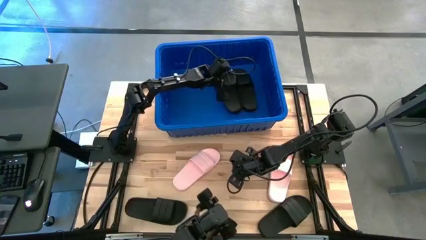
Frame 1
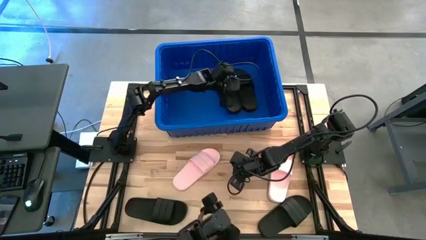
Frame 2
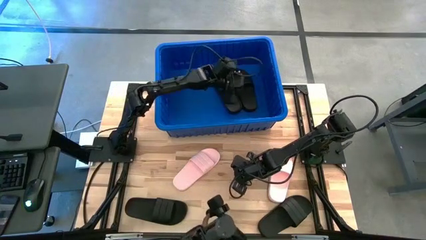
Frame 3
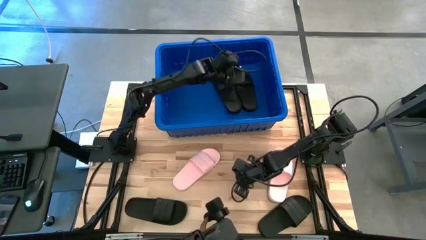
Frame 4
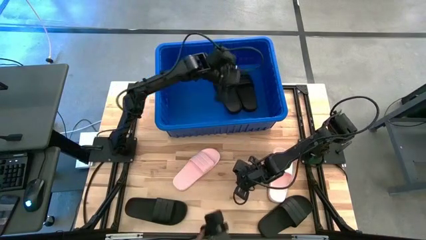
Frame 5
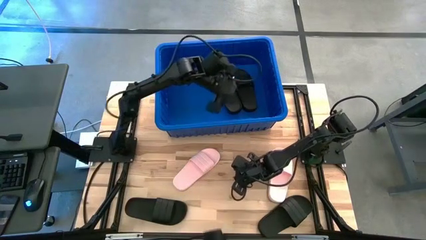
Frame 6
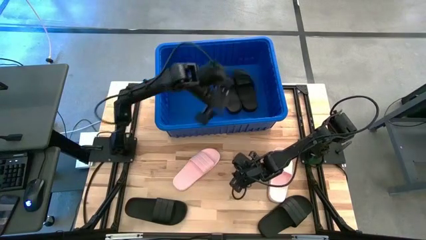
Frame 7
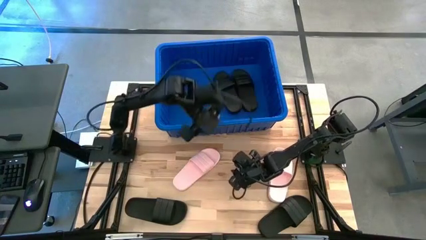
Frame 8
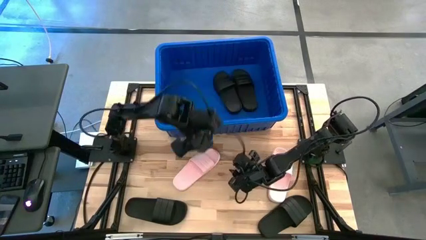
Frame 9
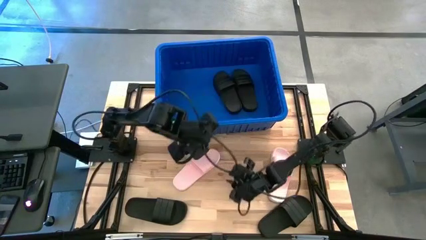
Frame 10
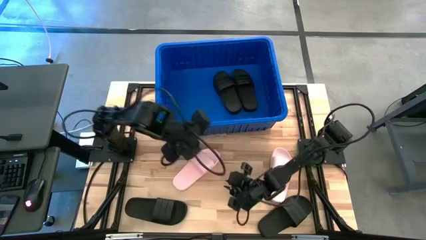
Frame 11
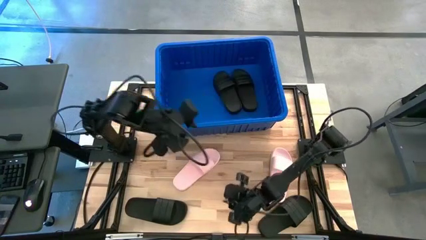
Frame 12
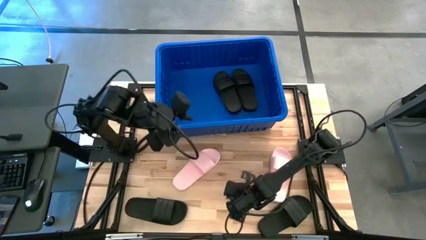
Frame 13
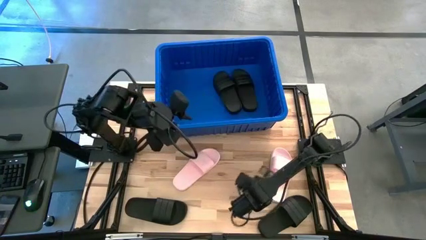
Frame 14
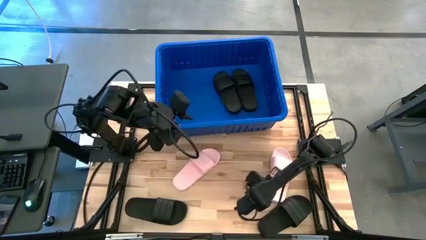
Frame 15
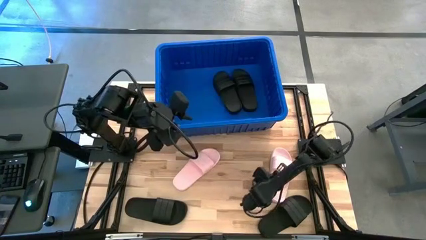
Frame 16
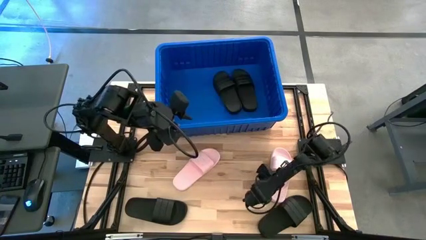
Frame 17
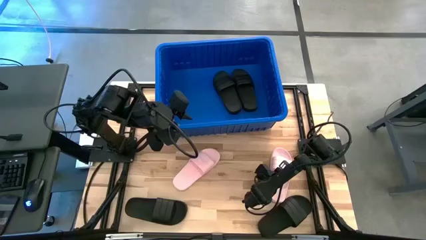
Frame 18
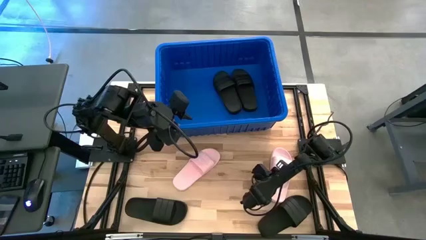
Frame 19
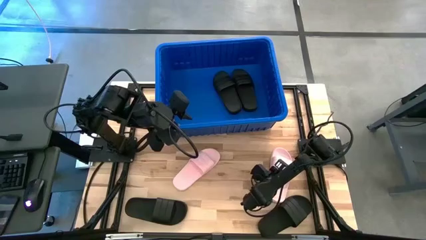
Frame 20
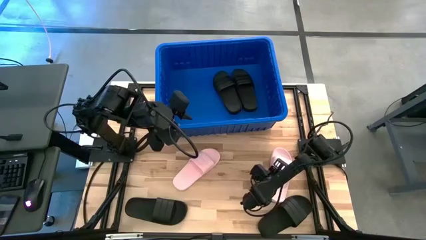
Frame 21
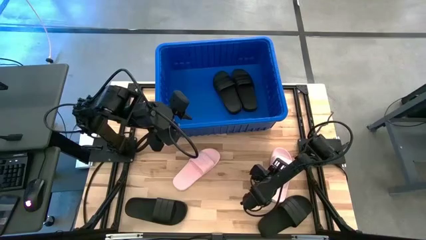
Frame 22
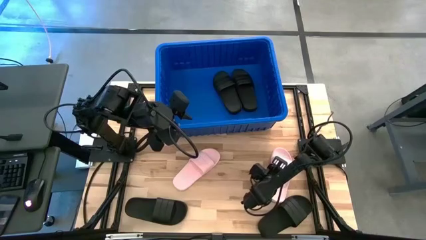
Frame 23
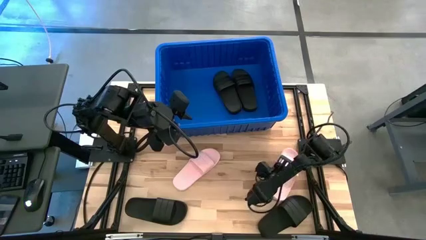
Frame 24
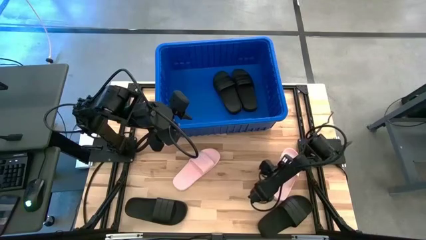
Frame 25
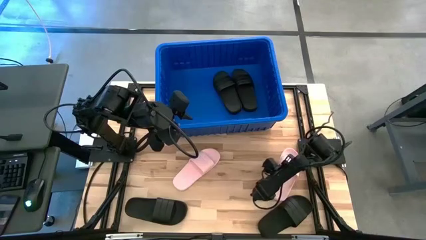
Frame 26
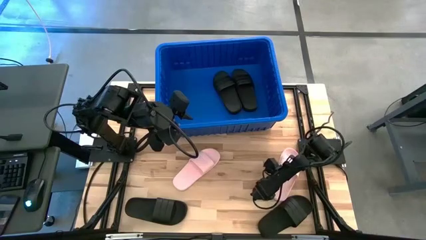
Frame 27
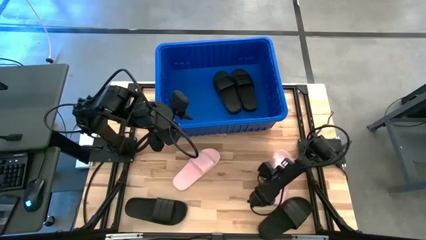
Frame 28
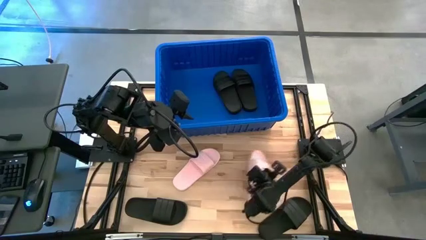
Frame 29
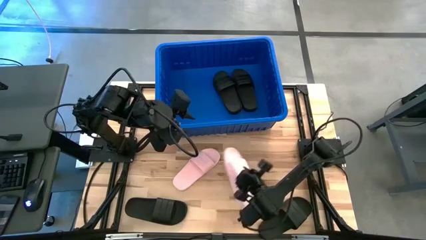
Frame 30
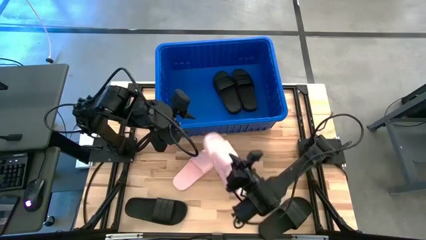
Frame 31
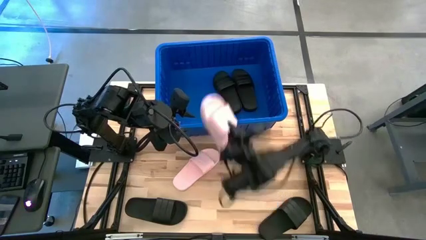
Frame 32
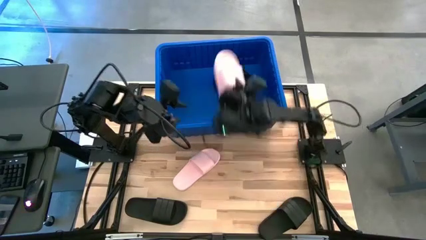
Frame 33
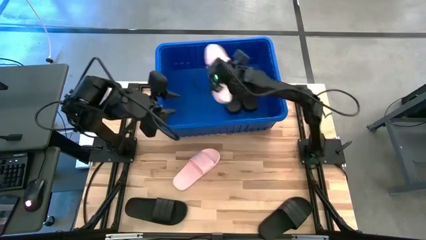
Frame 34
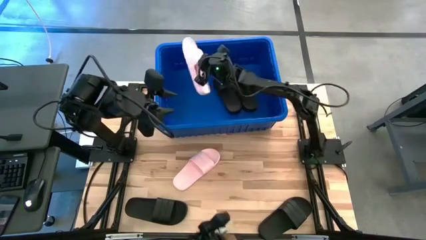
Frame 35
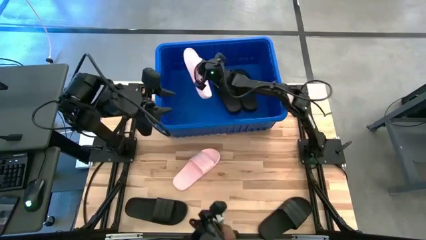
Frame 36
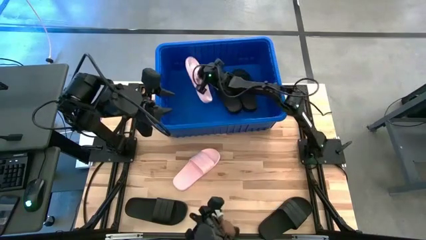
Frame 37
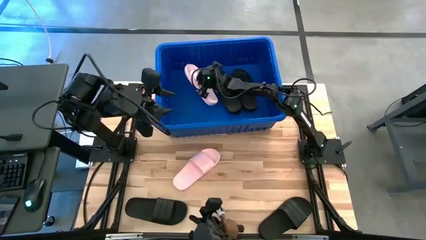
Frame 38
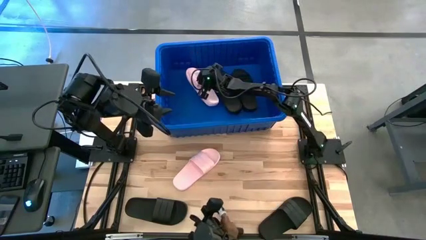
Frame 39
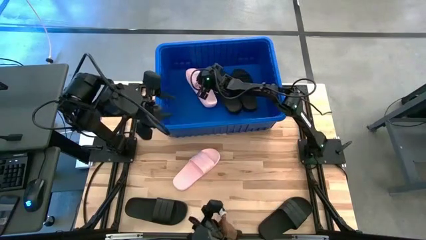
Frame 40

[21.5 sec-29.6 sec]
Task: Pick and place slides into bin
Put the right pink slide into the blue bin

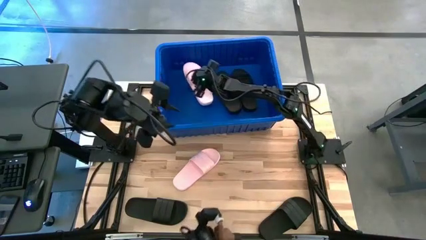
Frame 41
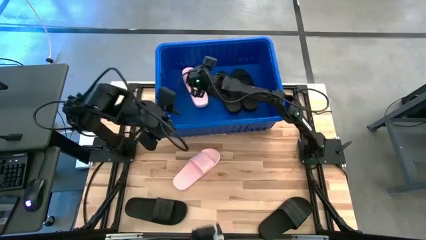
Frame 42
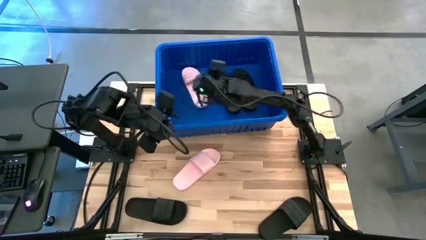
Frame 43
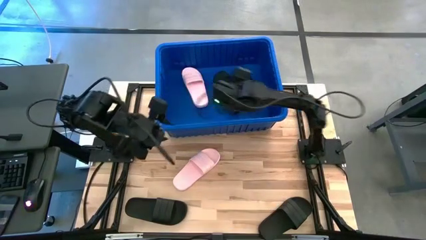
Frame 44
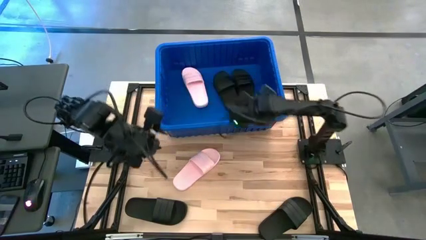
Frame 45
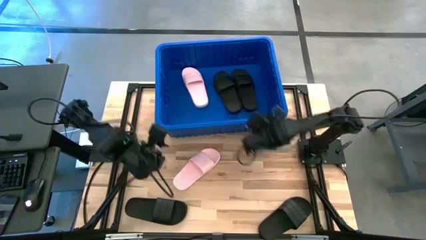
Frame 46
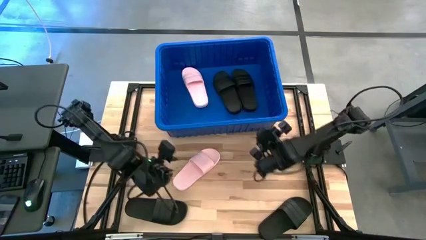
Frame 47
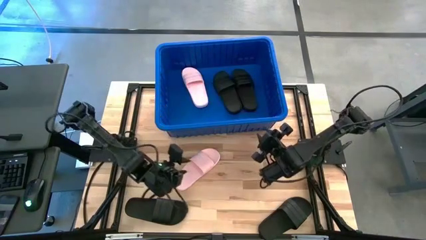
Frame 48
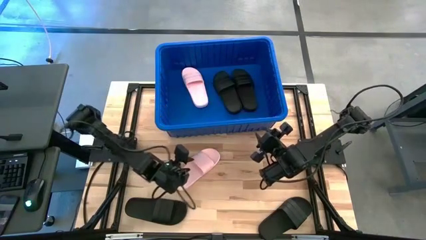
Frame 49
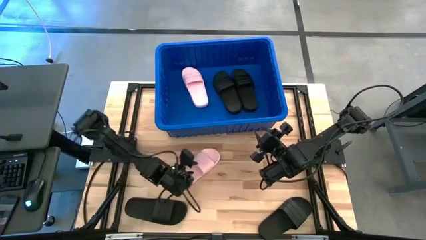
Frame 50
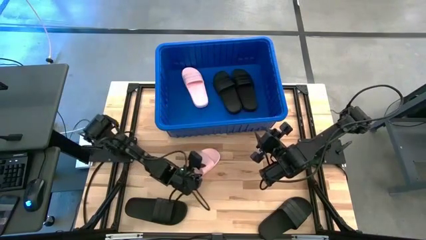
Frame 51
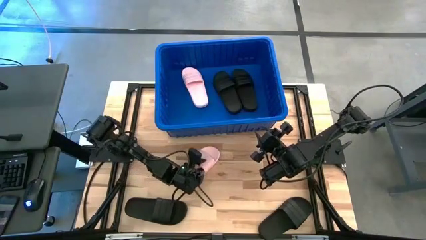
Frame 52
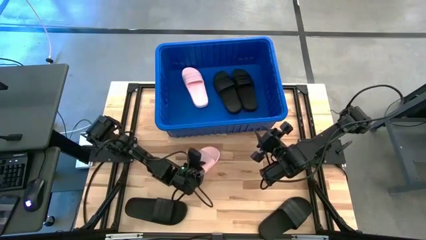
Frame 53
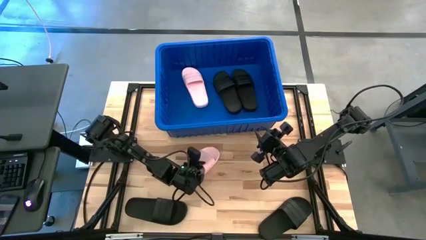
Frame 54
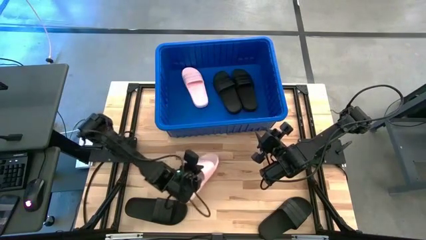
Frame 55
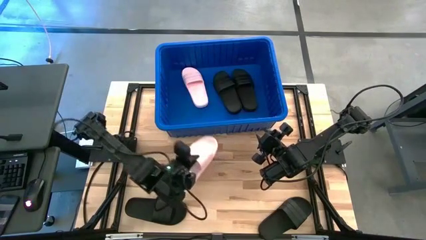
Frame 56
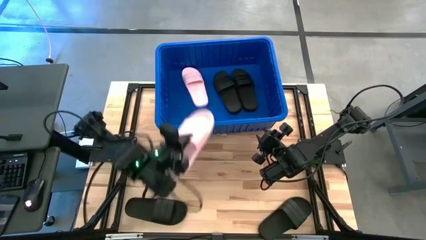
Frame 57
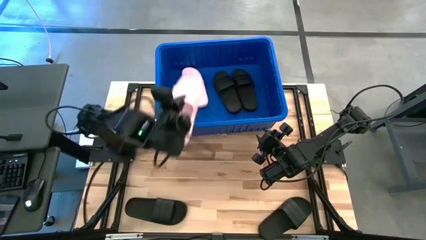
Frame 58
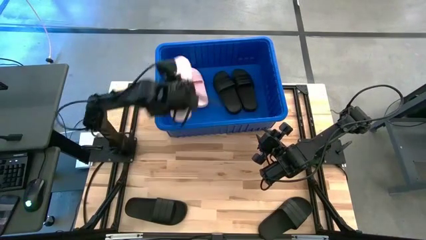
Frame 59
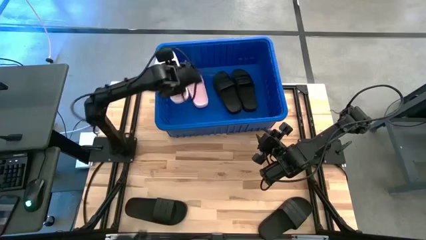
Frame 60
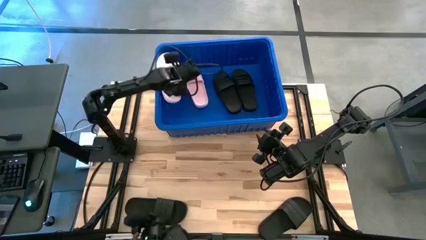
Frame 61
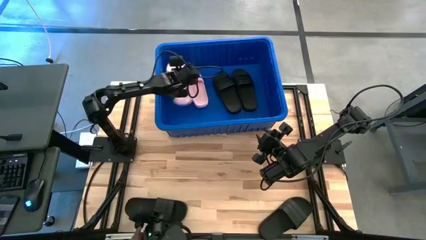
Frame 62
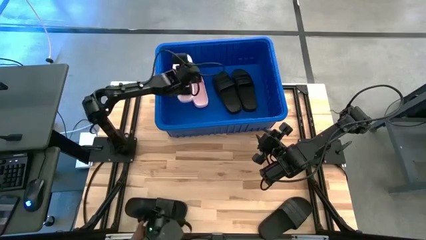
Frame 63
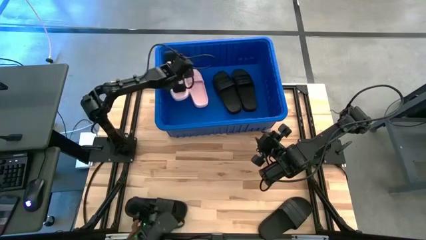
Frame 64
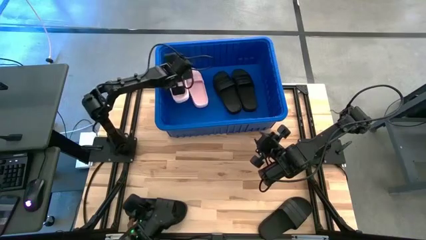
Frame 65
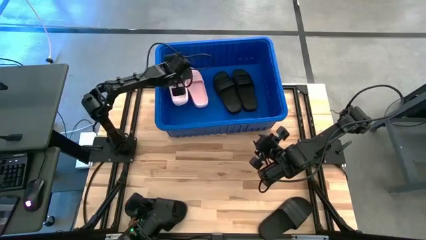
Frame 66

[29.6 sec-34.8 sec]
Put the pink slide into the blue bin

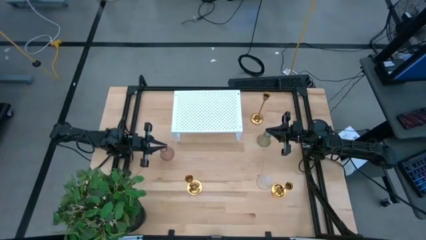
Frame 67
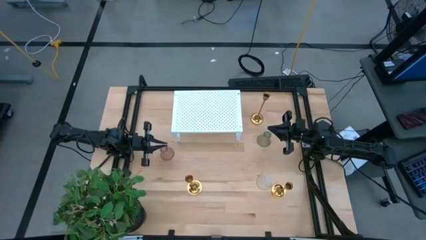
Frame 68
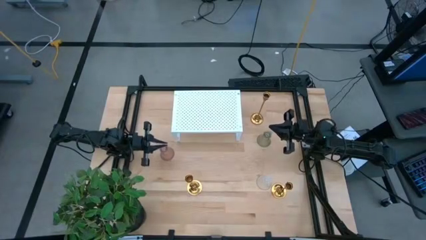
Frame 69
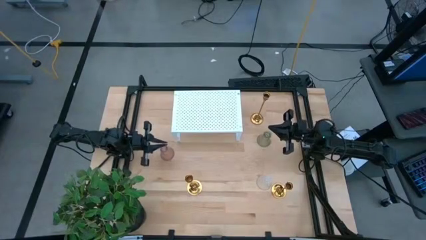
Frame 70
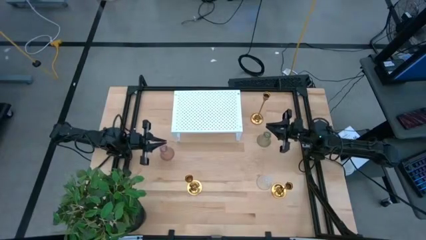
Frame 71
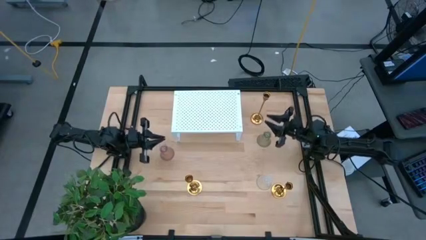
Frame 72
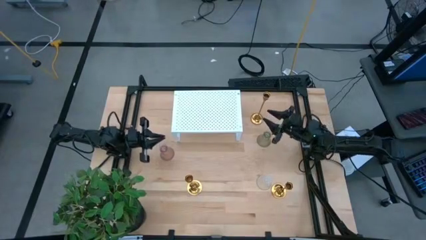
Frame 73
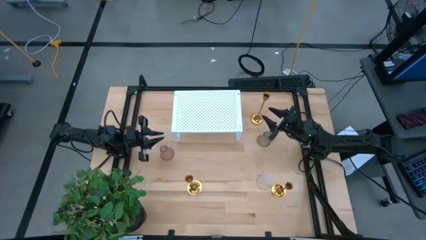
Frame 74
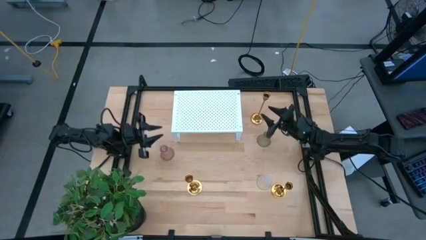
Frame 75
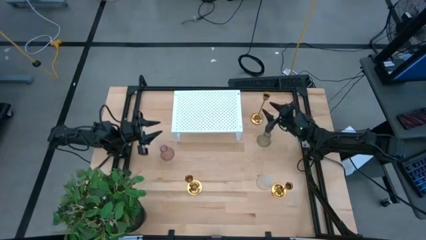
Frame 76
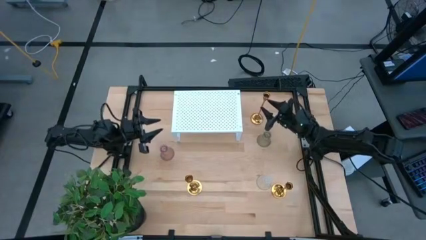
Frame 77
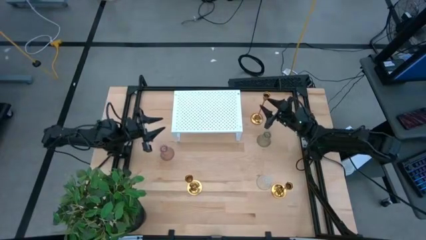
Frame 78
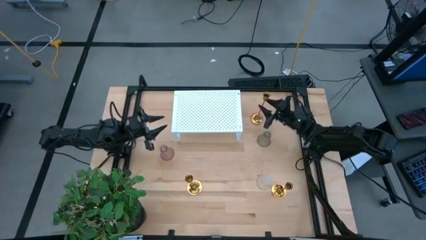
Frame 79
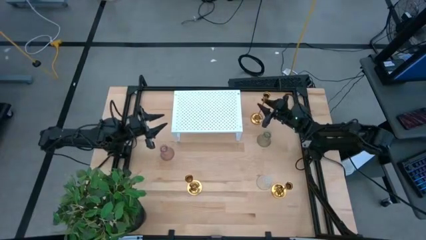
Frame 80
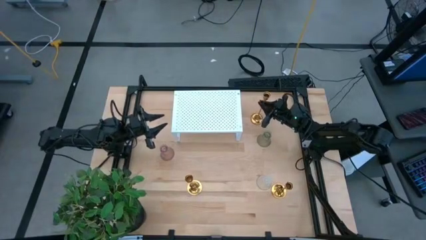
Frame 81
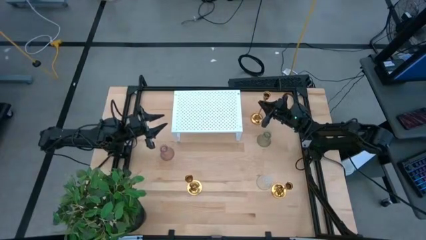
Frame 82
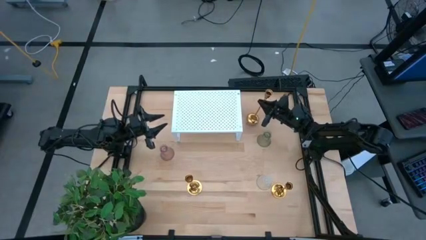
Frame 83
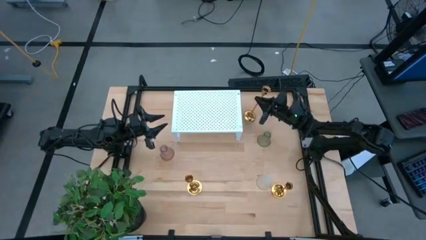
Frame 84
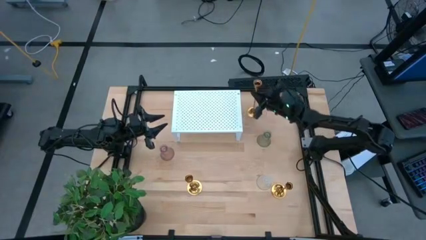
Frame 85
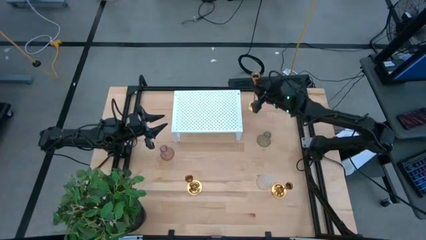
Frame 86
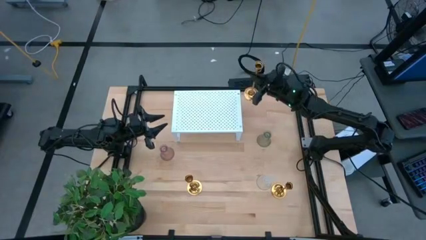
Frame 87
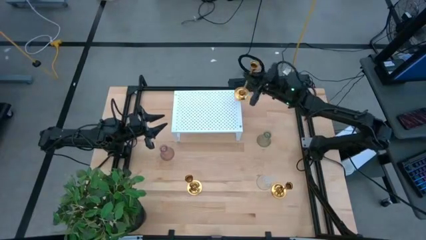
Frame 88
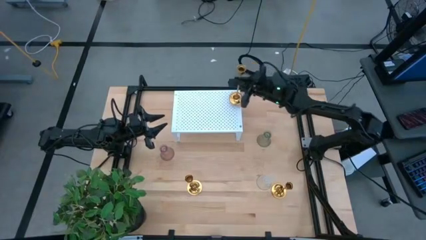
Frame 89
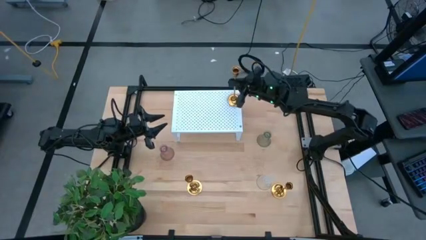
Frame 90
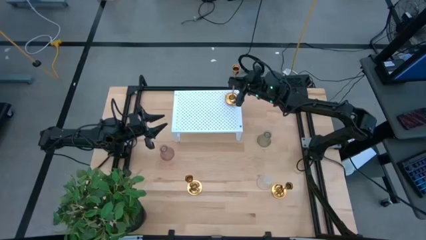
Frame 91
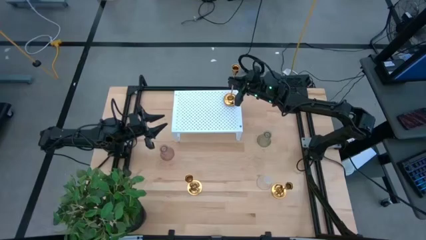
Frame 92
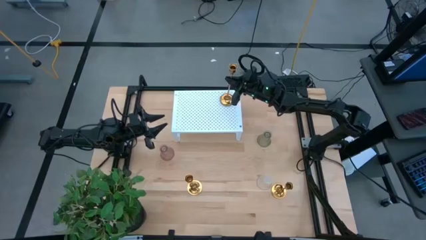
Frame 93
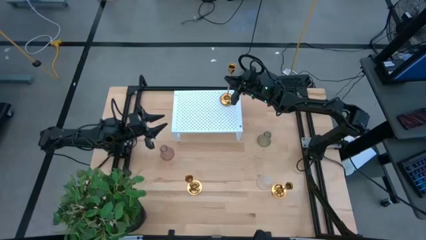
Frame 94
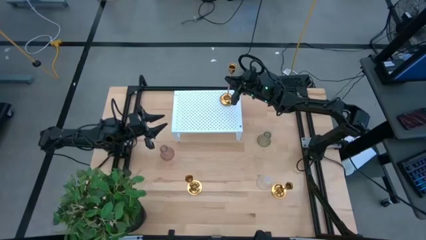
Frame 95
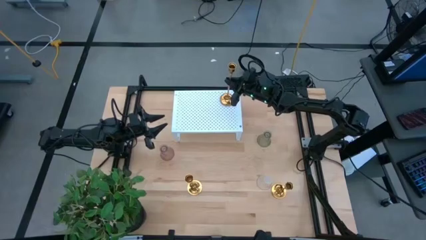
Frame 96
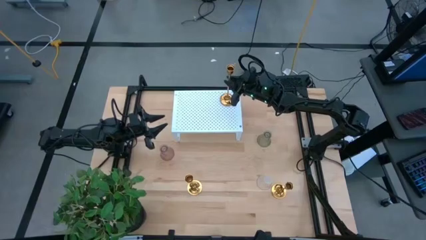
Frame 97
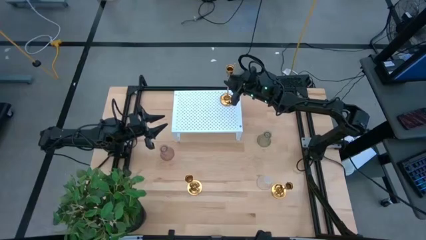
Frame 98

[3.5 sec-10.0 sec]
Task: Pick & Place candle stick holders
Put the top right large gold candle holder on the shelf
